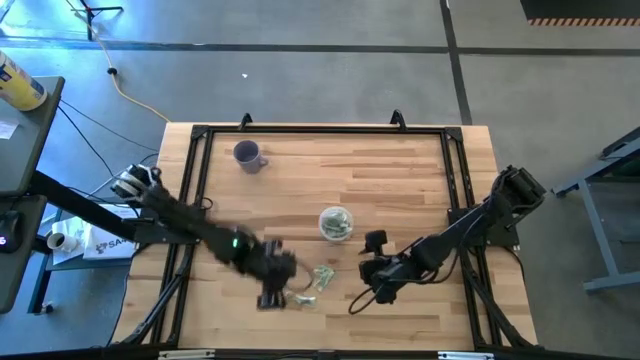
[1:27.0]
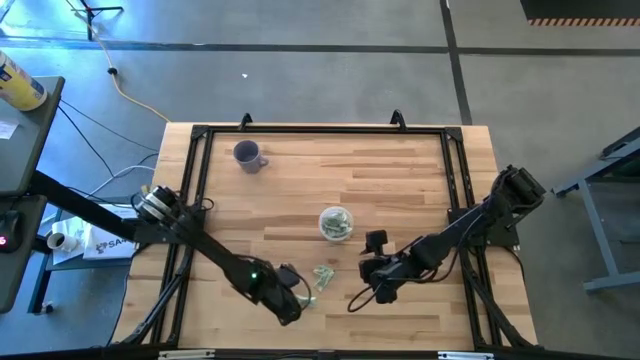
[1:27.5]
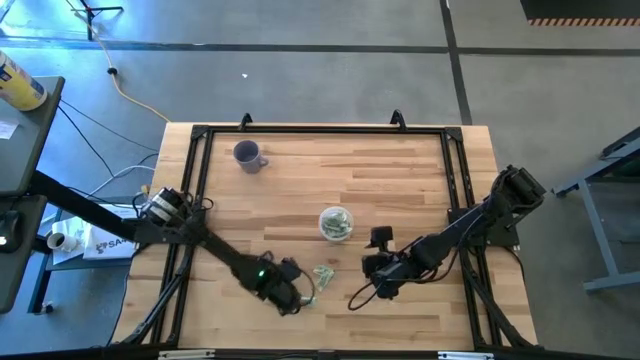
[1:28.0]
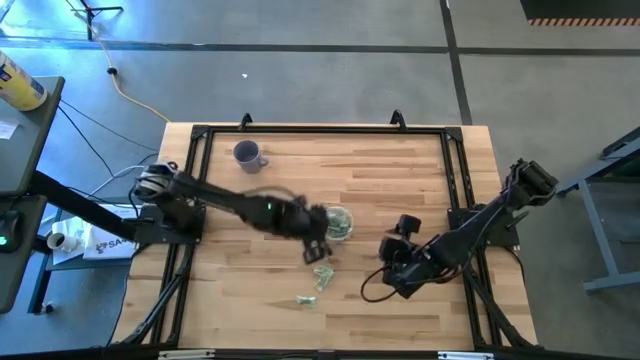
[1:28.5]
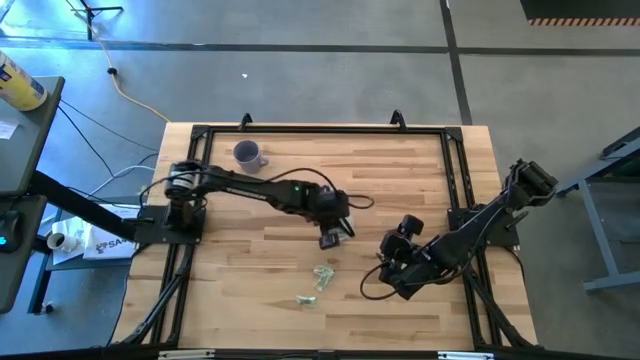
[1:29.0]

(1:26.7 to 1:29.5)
Task: Pick and place Stevia / Truvia into bins
Put the stevia packet into the transparent container

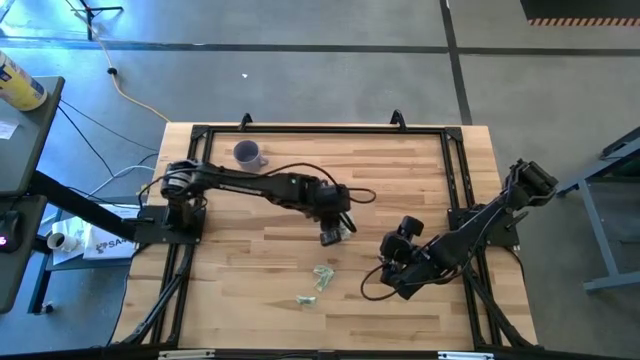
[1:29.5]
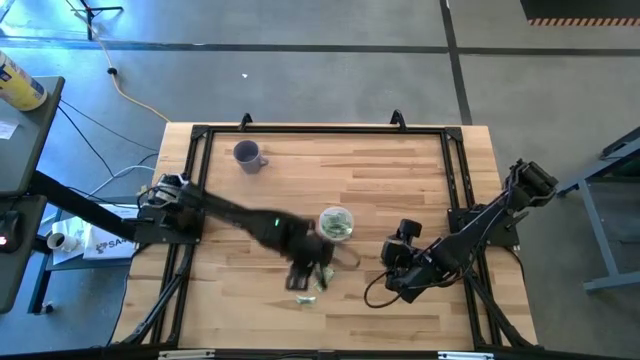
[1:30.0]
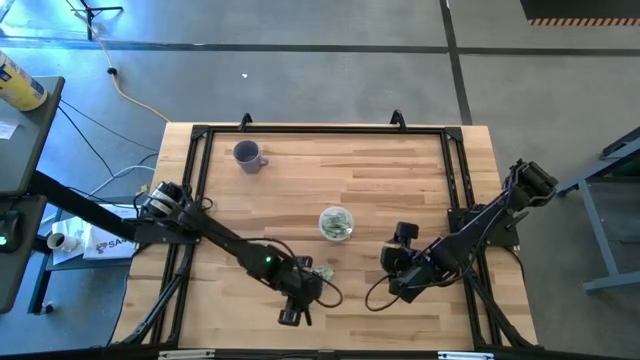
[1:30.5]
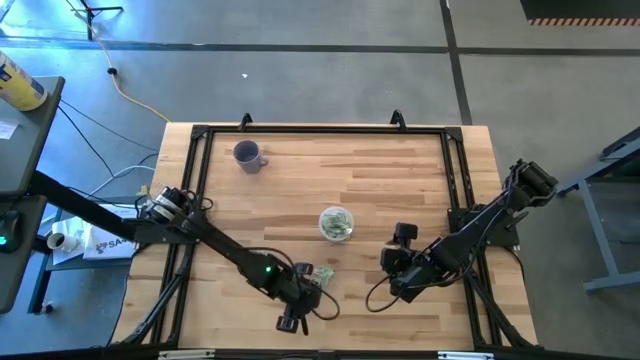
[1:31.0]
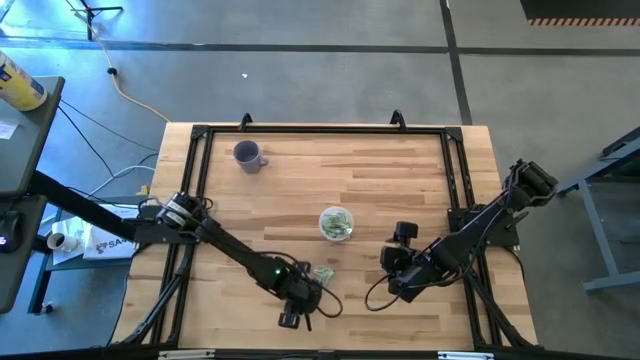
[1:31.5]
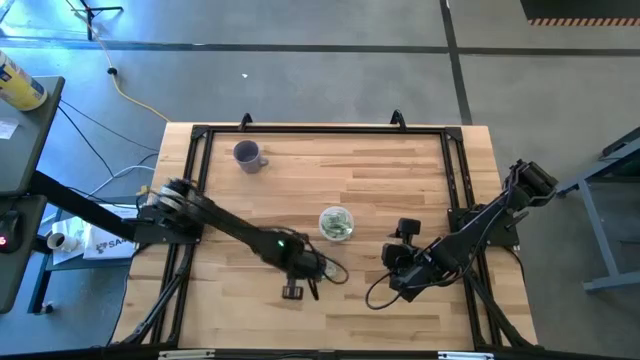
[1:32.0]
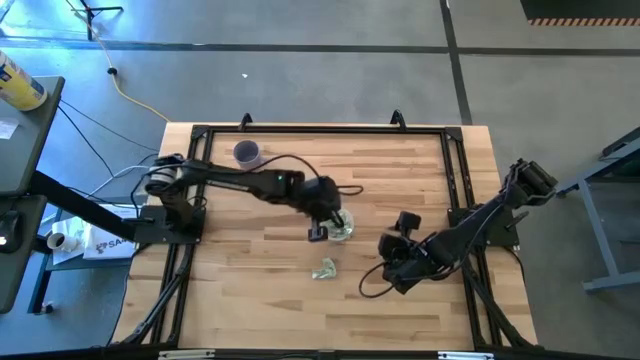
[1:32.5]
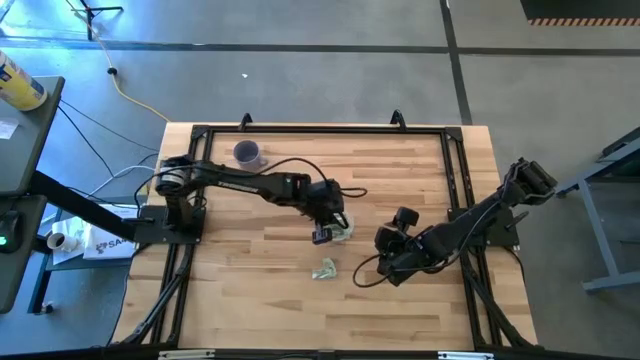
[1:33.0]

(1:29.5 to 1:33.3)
Put the bottom stevia packet into the transparent container

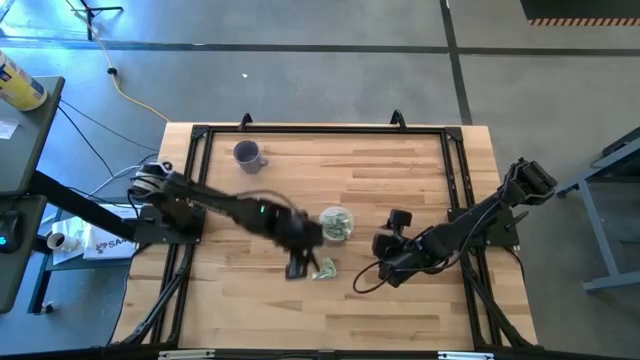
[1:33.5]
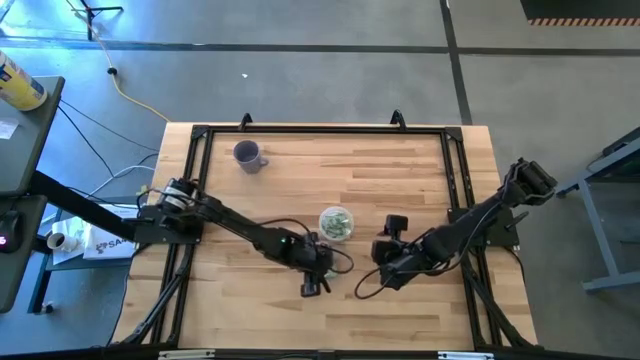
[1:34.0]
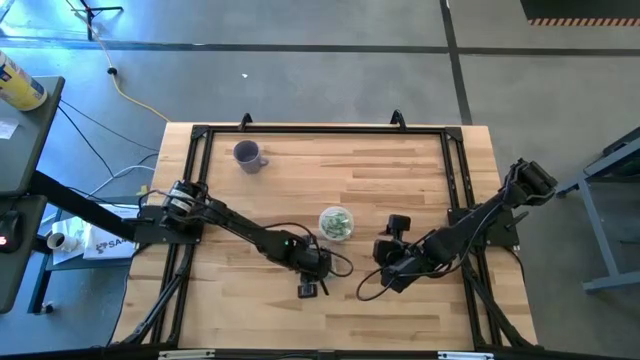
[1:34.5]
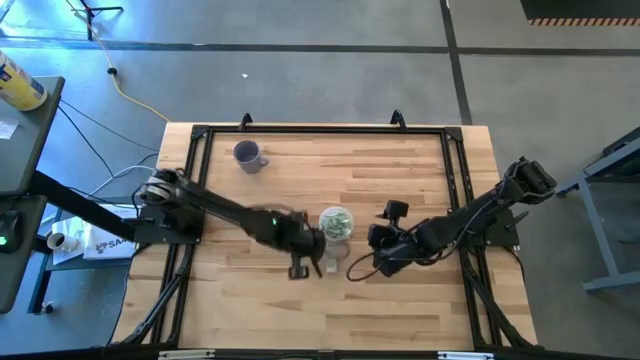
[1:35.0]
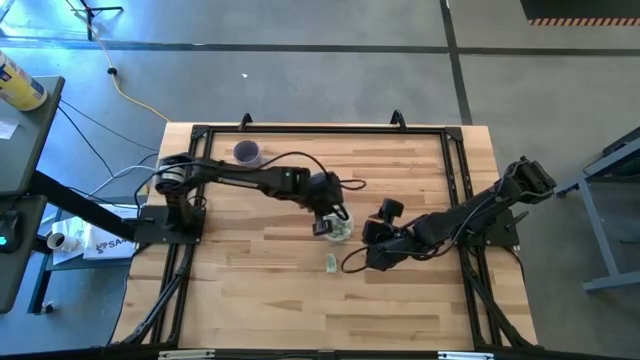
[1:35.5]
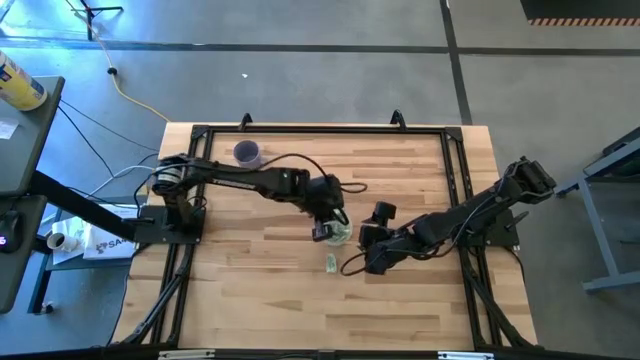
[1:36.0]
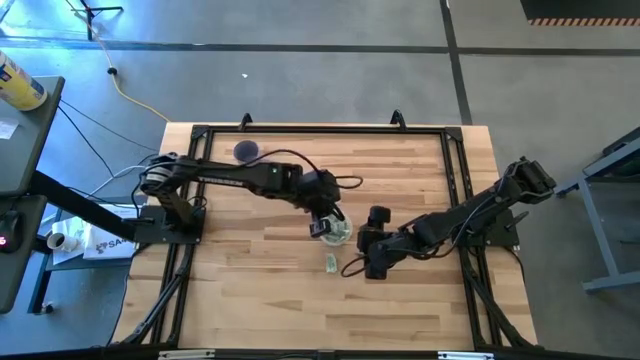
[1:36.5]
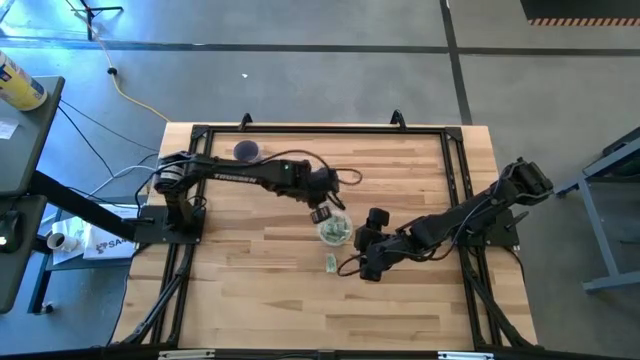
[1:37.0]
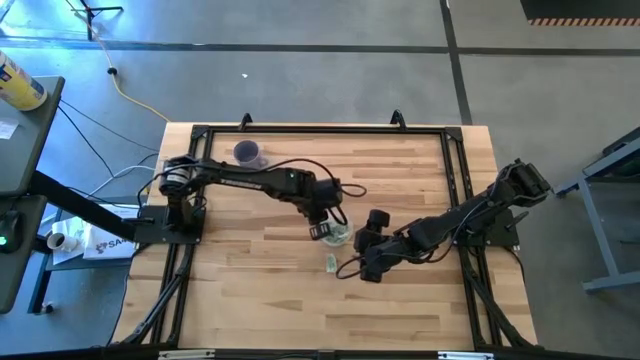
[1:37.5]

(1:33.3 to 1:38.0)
Put the bottom stevia packet into the transparent container

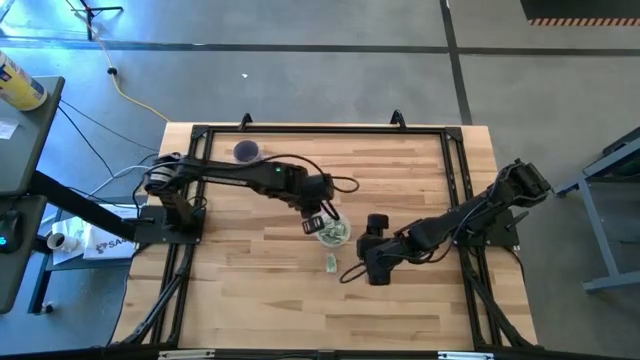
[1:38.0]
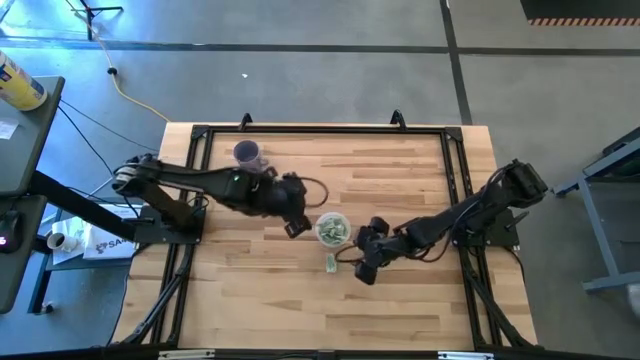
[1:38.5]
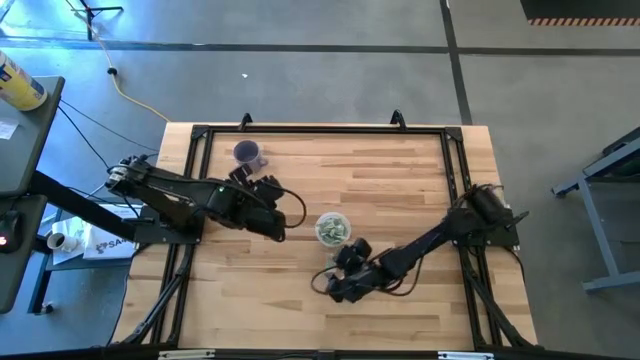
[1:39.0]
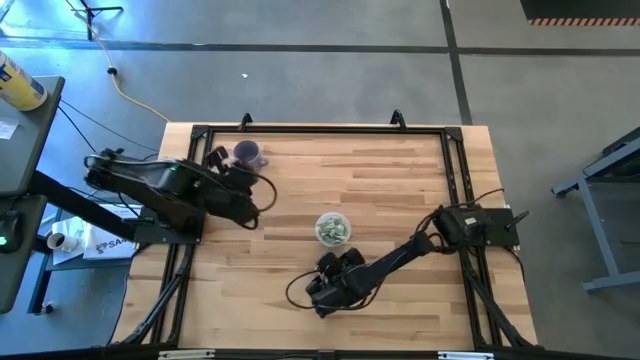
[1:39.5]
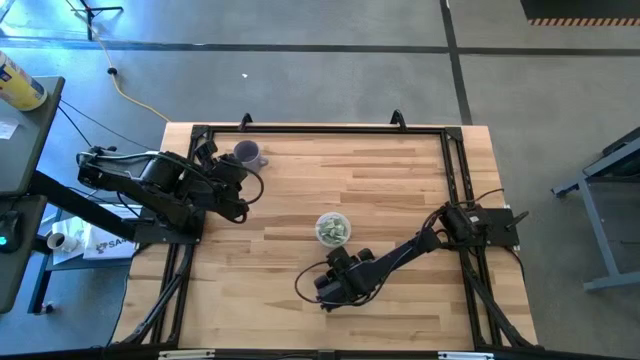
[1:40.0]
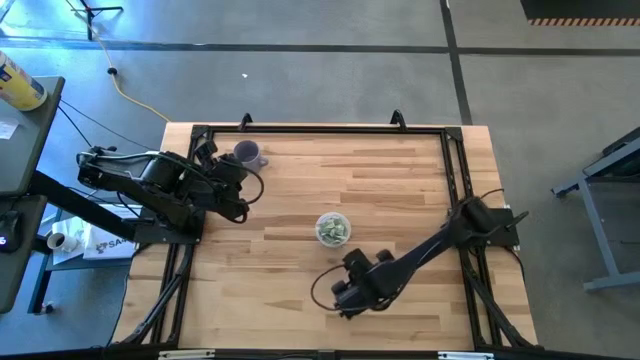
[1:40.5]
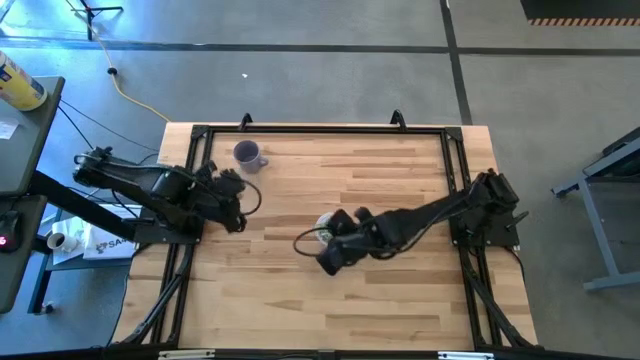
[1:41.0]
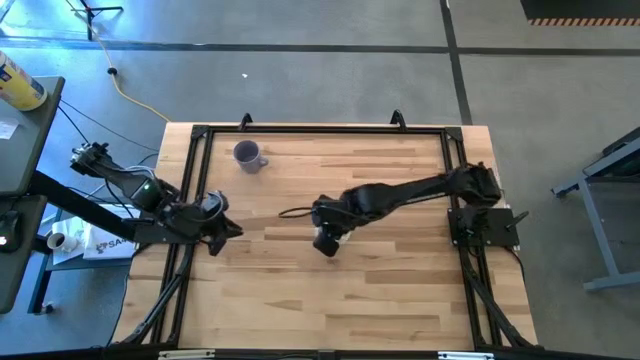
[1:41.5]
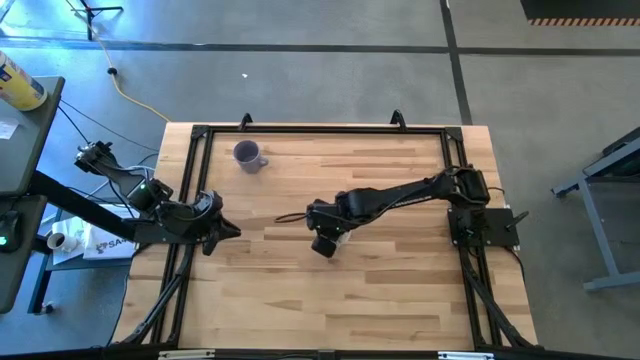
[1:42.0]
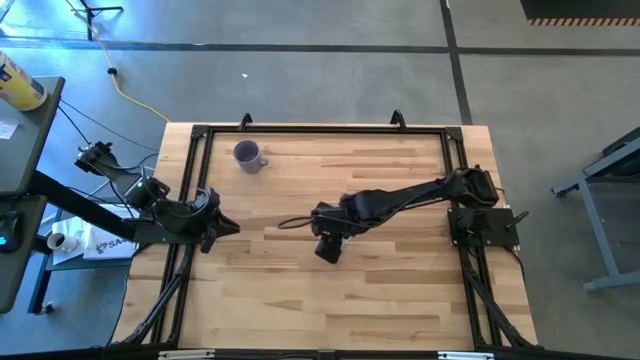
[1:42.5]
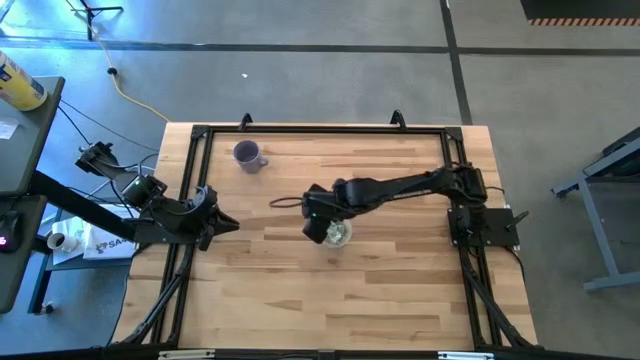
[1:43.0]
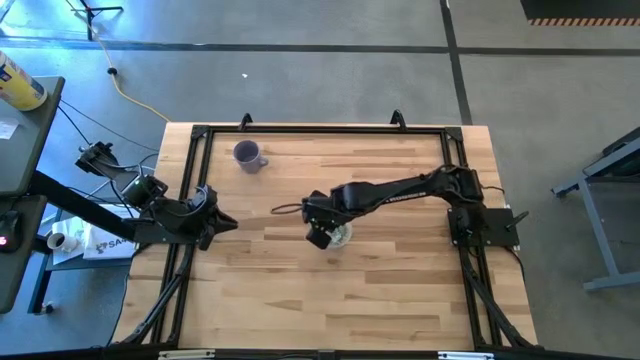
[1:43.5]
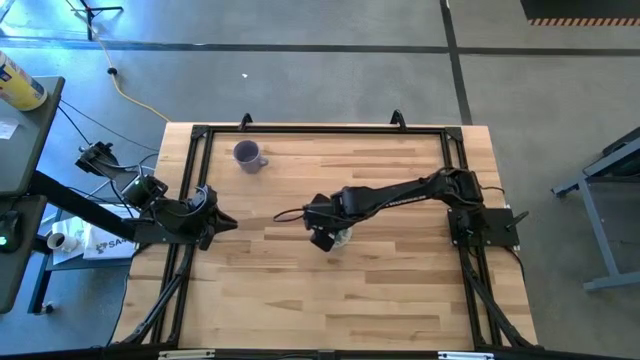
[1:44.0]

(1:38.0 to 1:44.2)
Put the stevia packet into the transparent container

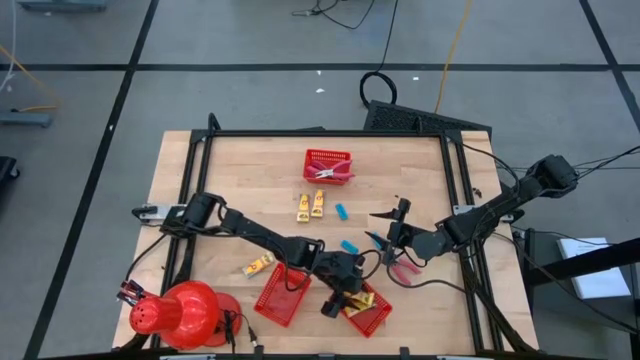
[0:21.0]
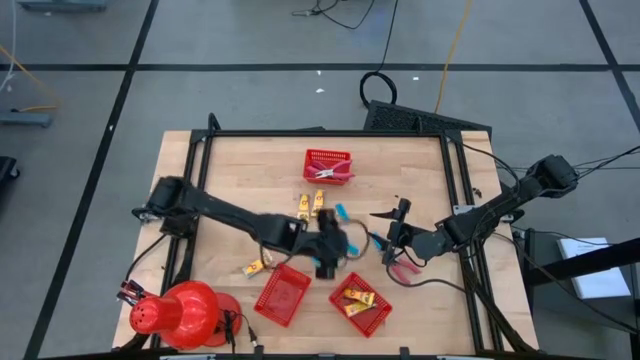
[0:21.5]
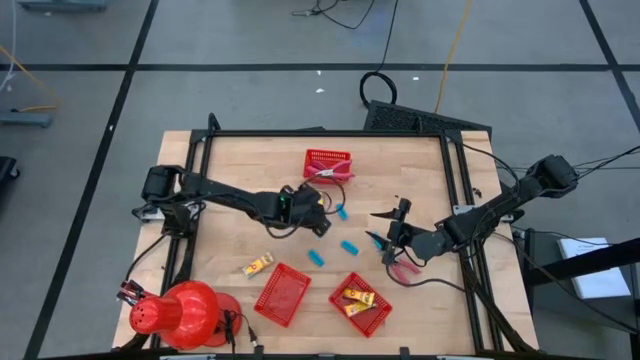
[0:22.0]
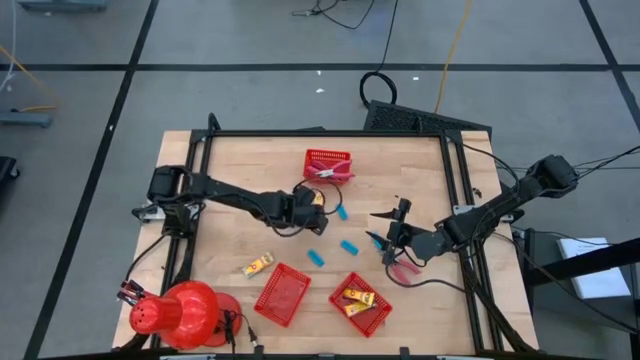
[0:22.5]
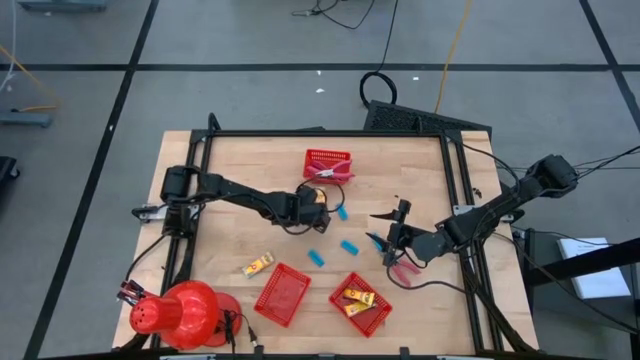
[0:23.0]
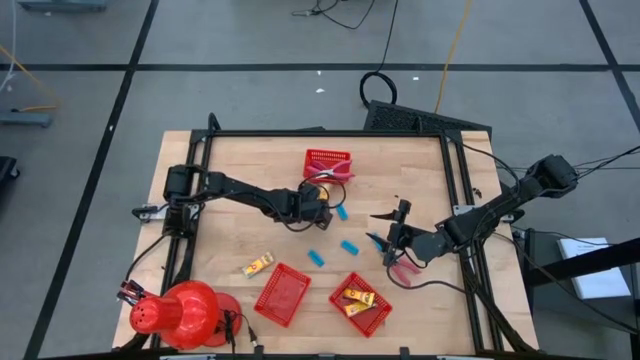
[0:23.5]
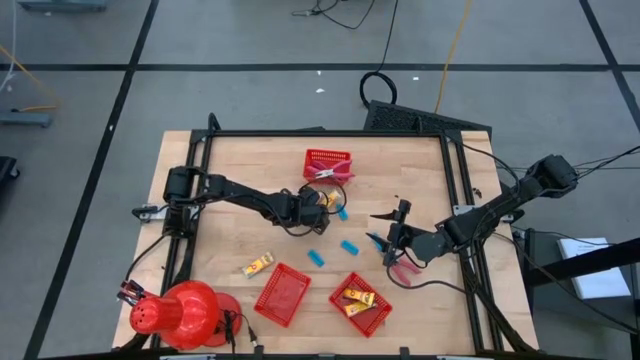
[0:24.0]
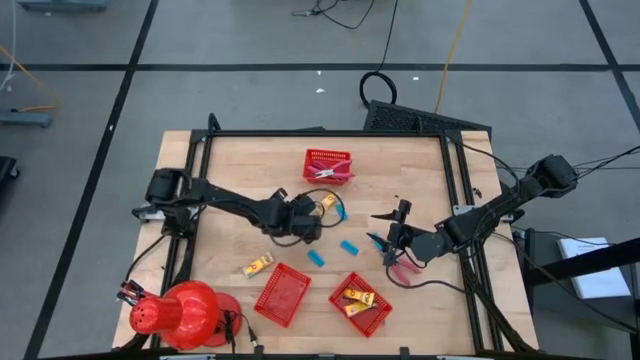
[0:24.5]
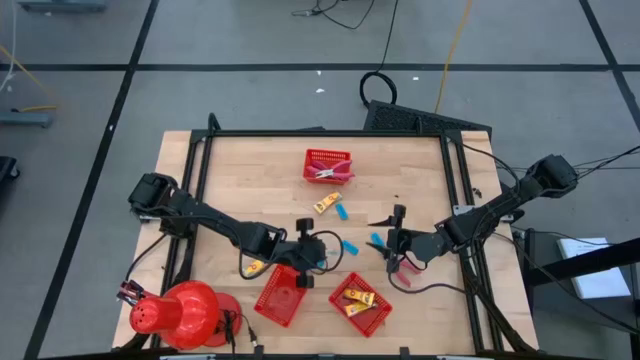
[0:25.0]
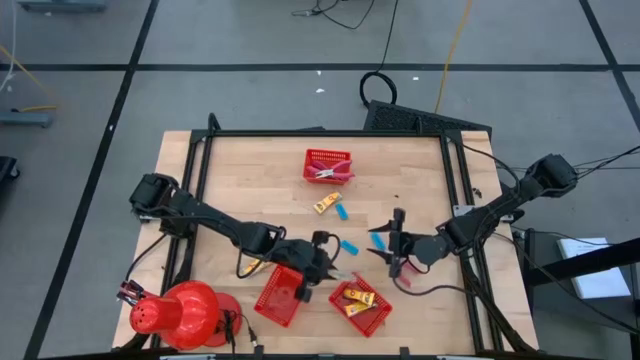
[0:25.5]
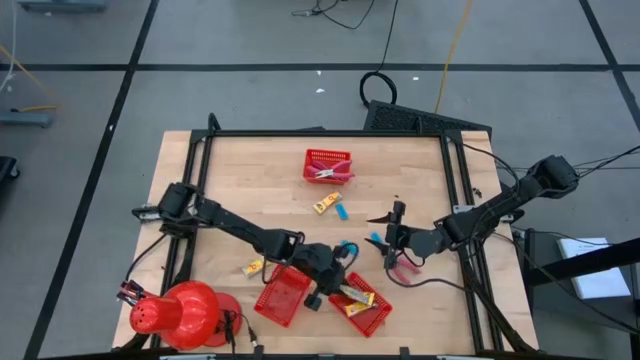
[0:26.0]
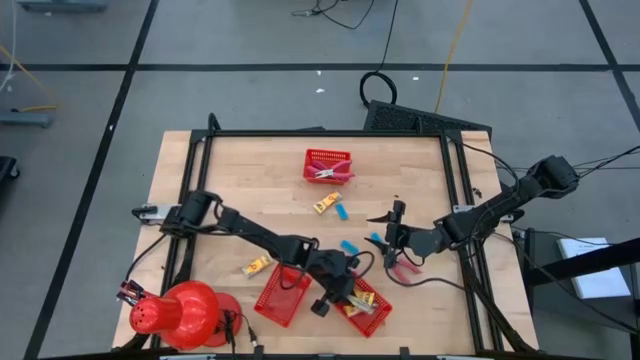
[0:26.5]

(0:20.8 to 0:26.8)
Task: Pick & Place School Supplies
Put the yellow crayon pack into the bottom right red basket
